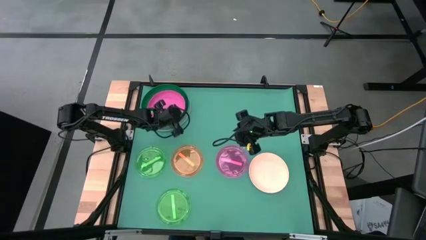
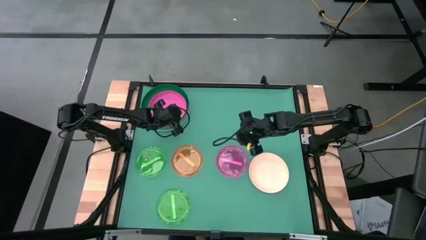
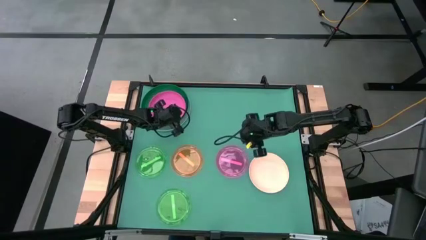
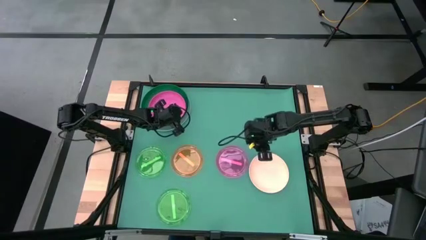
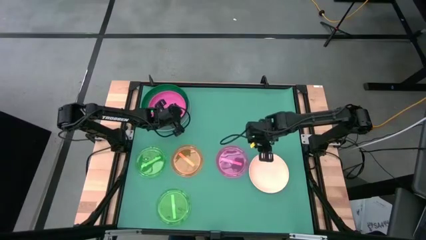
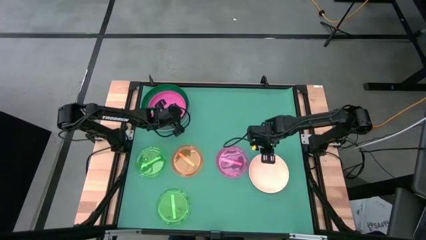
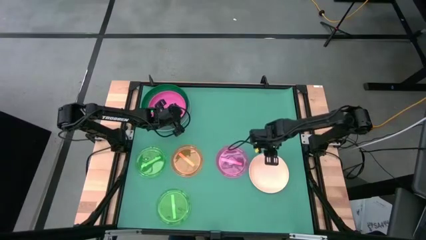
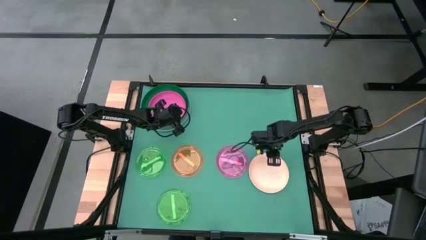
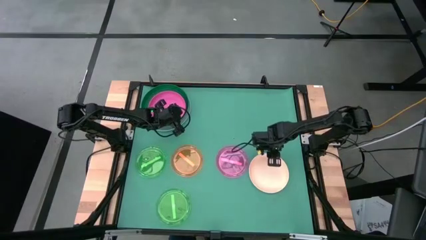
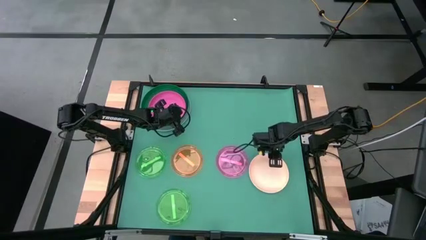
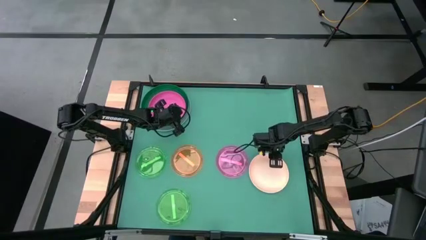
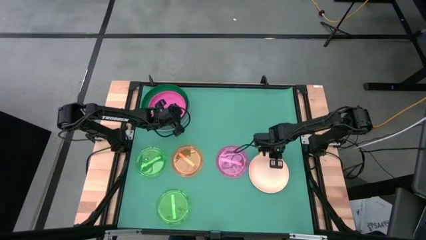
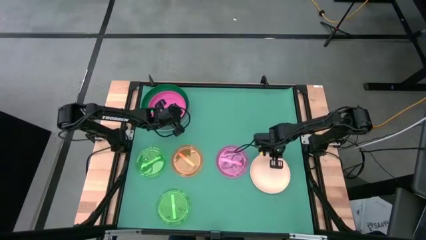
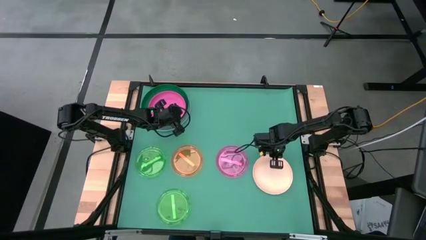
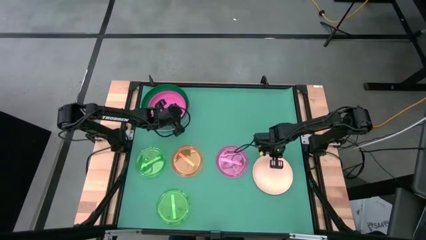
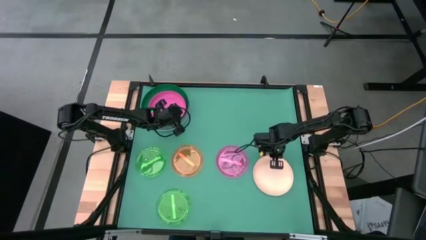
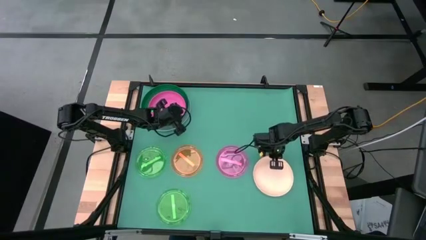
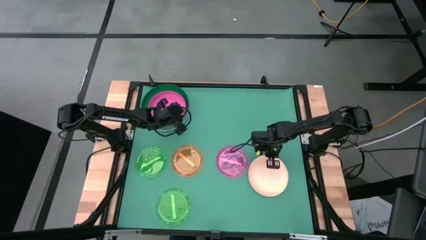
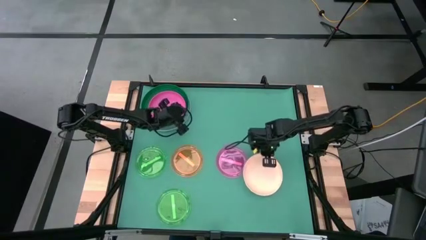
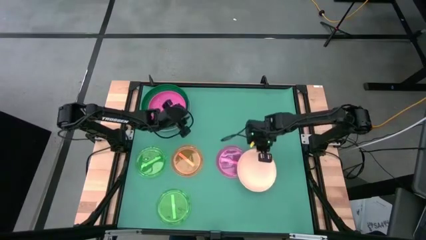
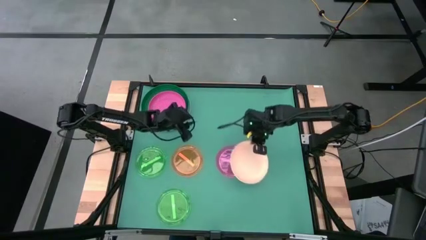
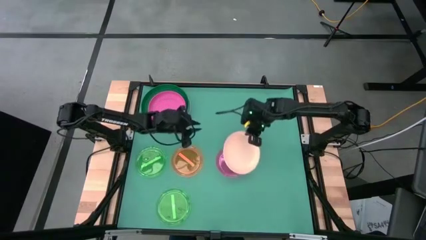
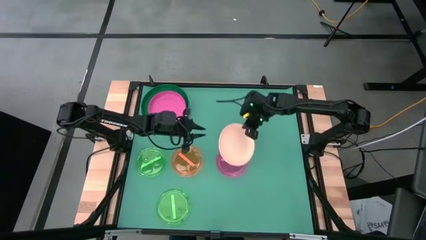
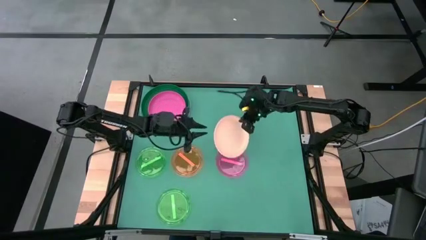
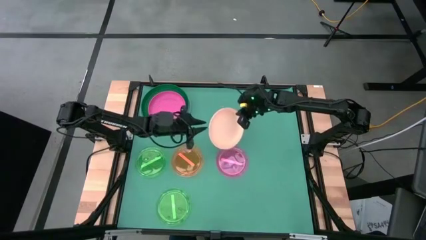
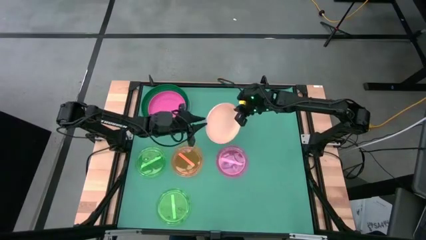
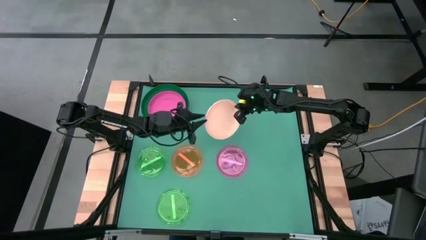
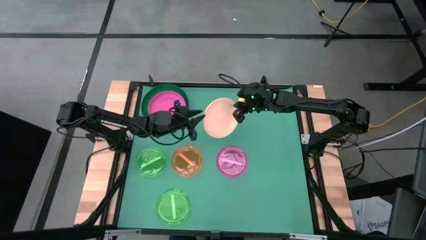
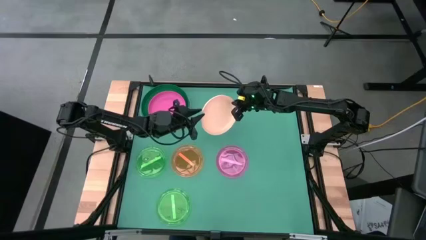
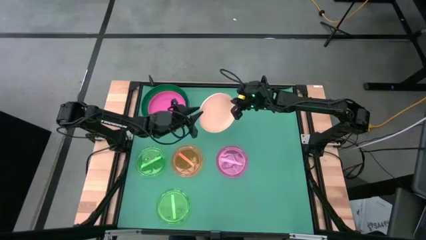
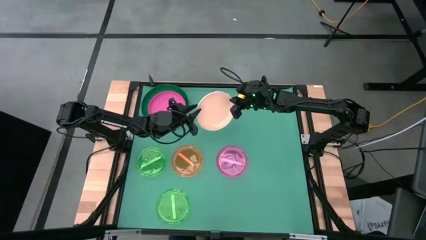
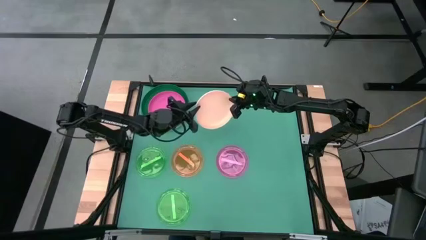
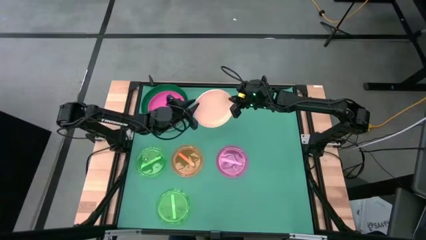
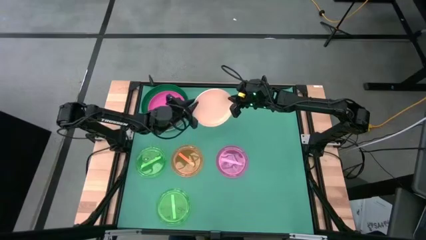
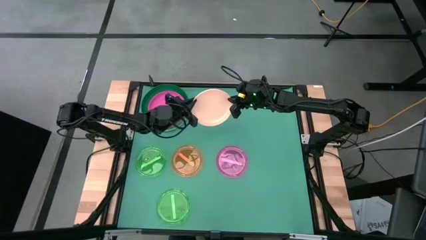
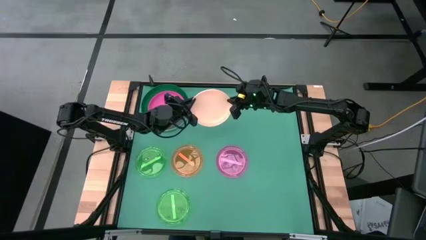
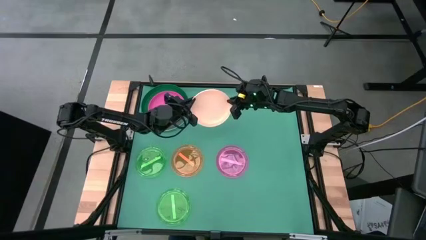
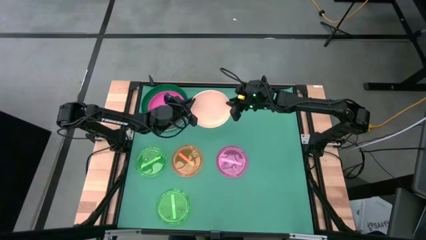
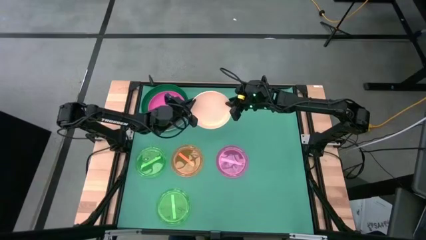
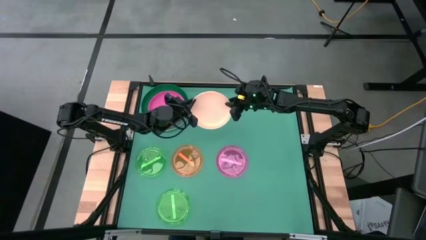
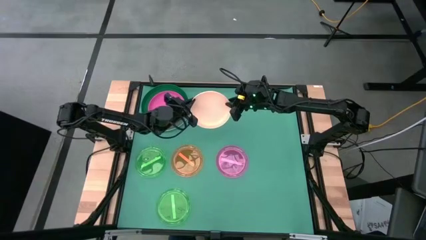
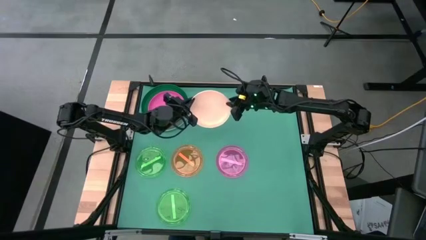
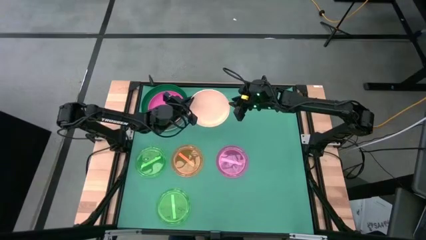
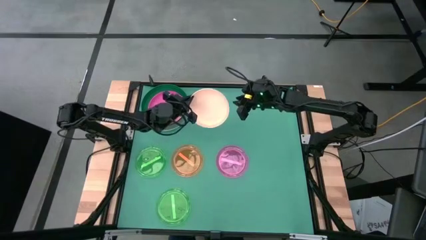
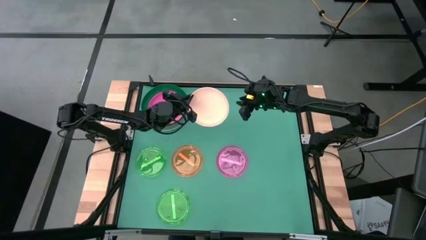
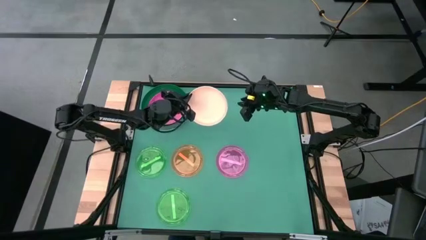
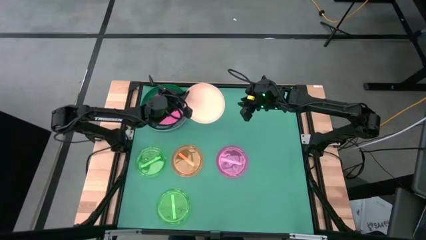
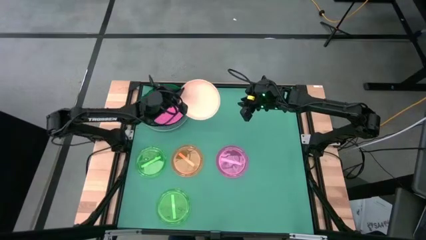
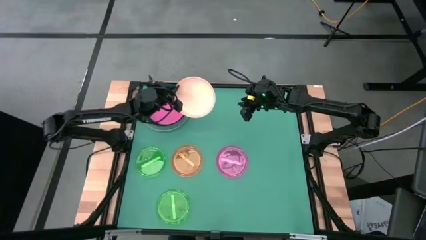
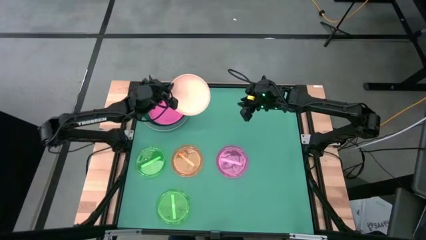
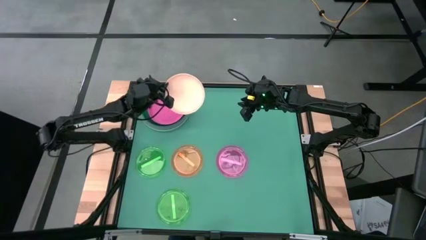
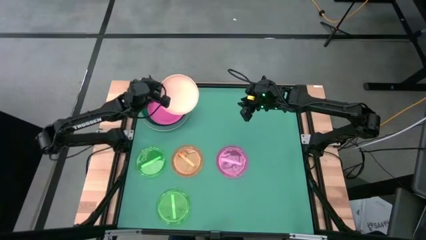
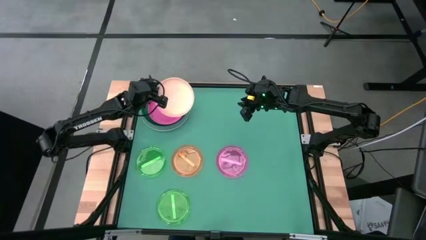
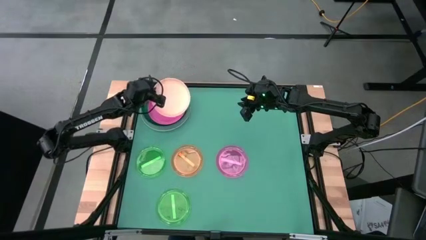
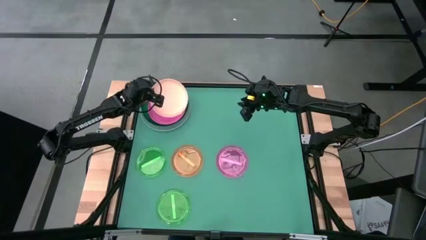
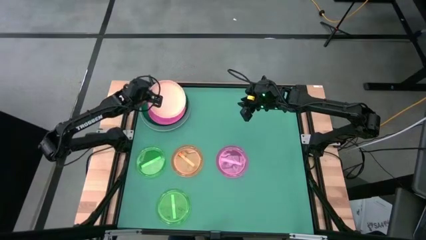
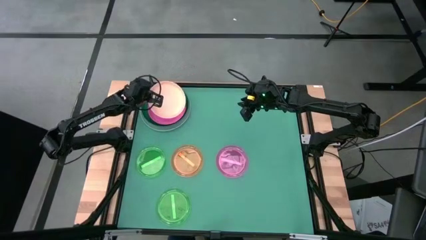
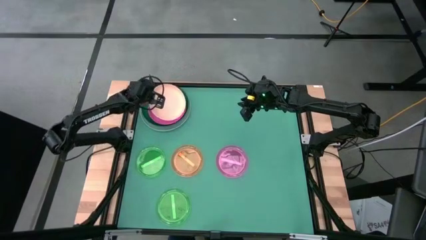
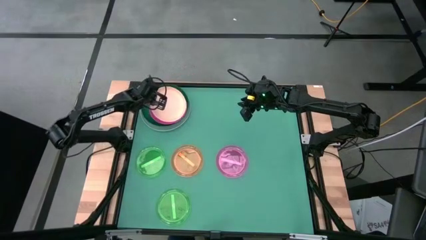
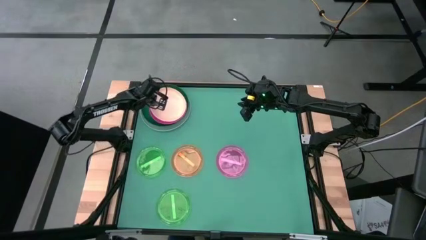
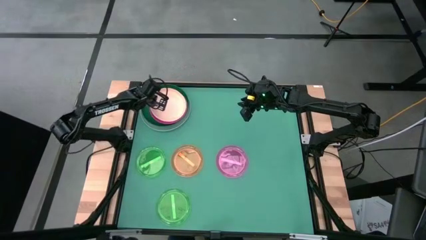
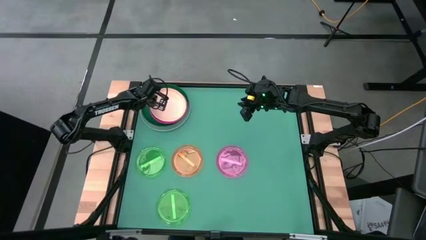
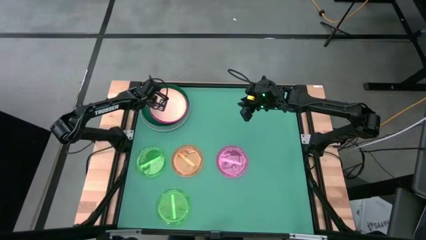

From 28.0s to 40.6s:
Task: Stack plastic plates
Stack the light orange plate on top of the dark pink plate
